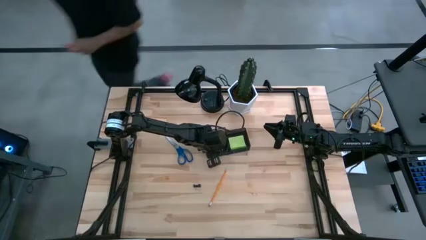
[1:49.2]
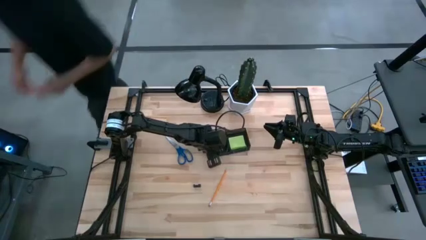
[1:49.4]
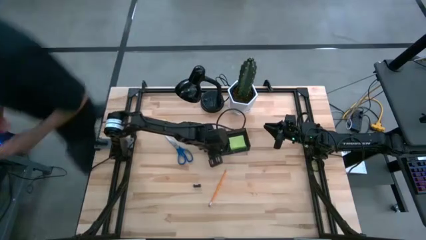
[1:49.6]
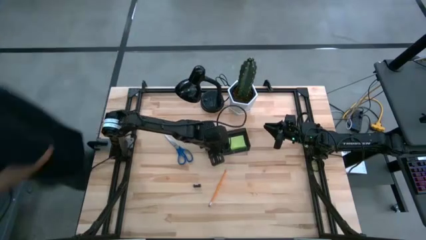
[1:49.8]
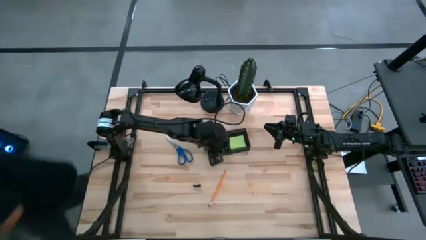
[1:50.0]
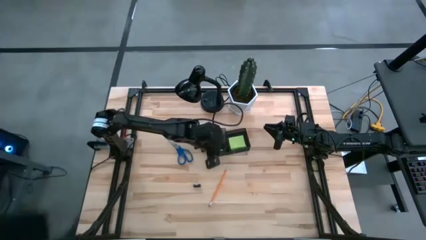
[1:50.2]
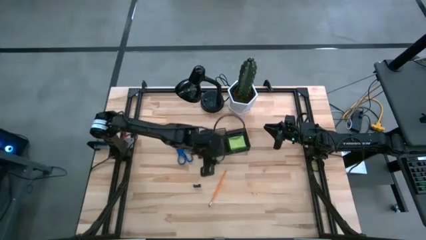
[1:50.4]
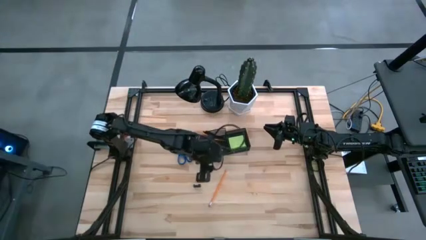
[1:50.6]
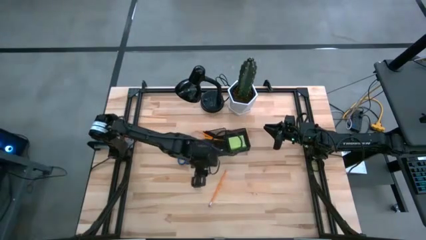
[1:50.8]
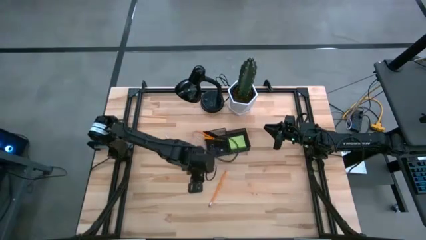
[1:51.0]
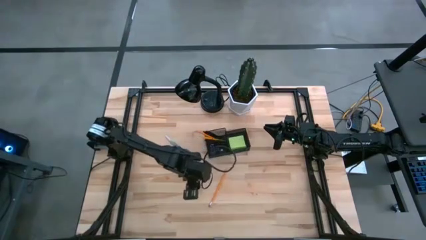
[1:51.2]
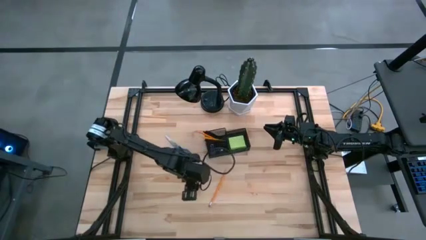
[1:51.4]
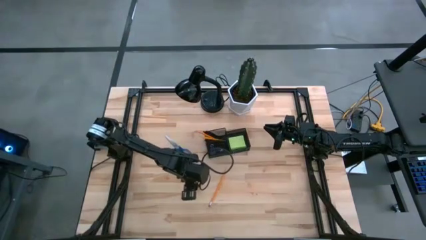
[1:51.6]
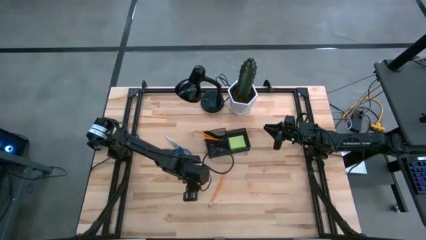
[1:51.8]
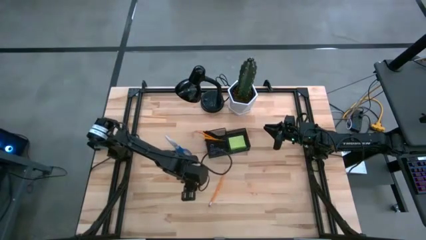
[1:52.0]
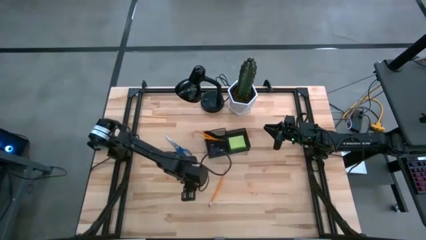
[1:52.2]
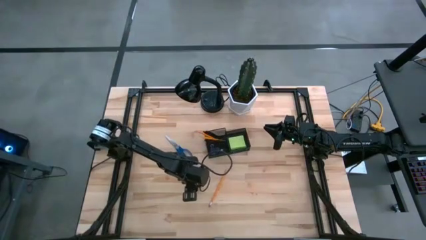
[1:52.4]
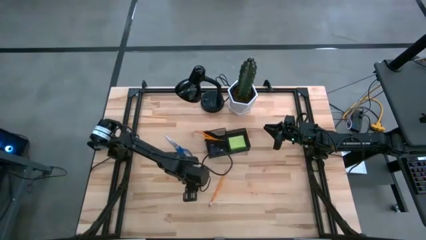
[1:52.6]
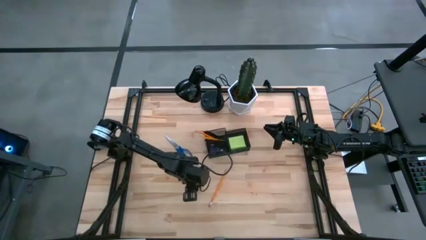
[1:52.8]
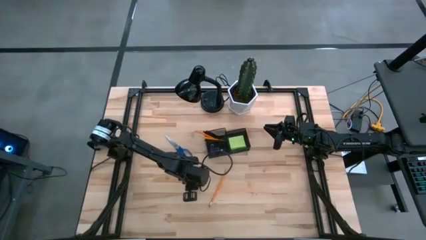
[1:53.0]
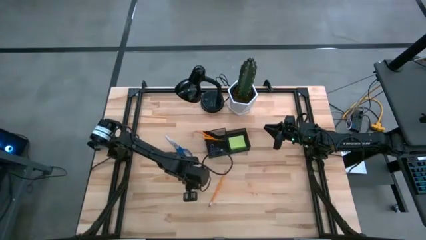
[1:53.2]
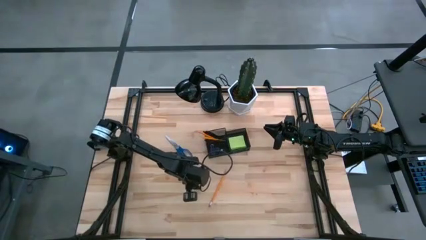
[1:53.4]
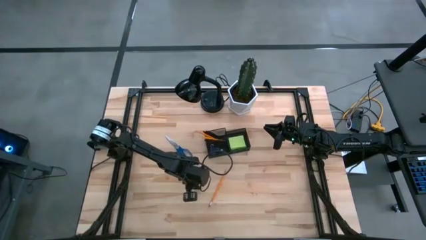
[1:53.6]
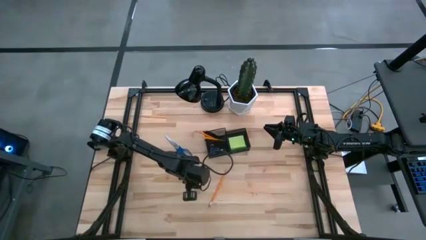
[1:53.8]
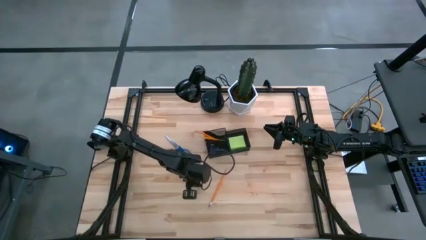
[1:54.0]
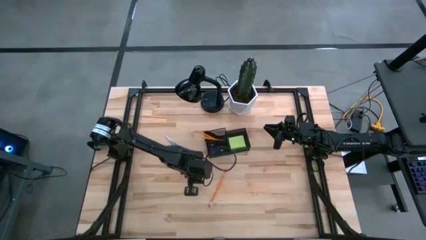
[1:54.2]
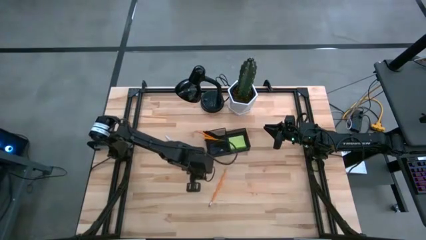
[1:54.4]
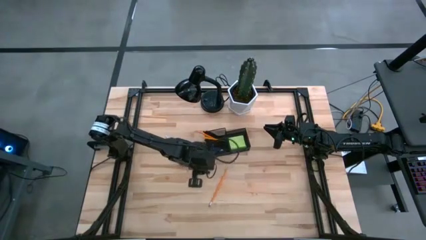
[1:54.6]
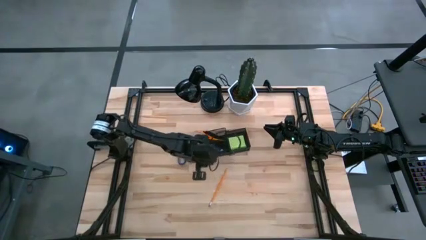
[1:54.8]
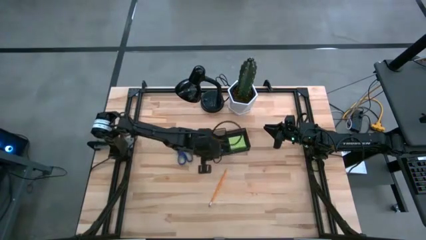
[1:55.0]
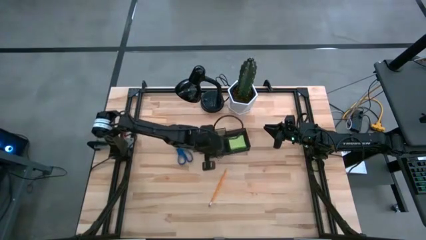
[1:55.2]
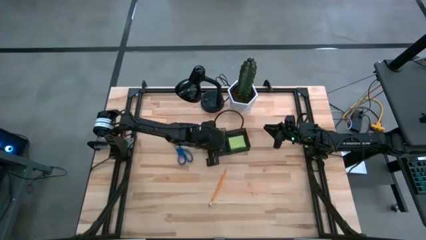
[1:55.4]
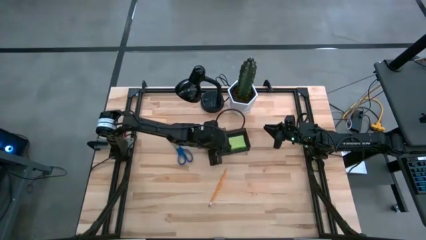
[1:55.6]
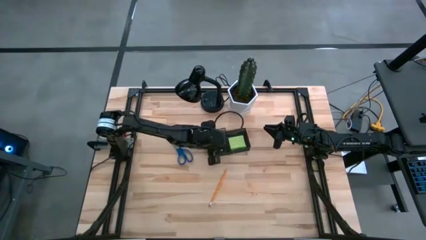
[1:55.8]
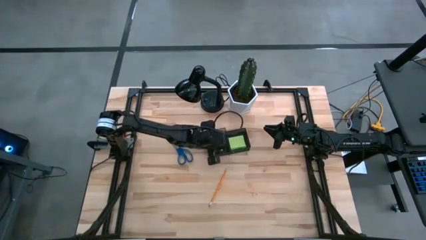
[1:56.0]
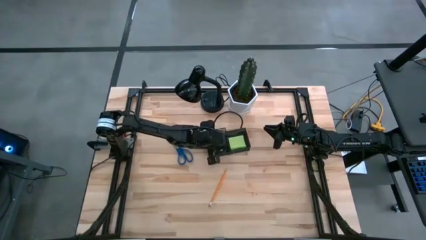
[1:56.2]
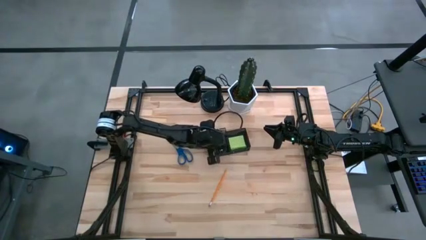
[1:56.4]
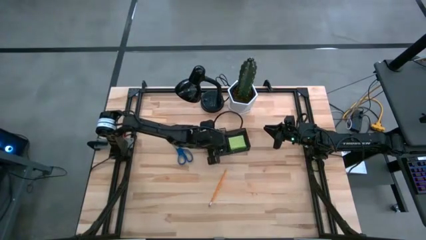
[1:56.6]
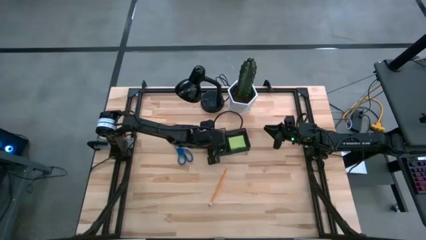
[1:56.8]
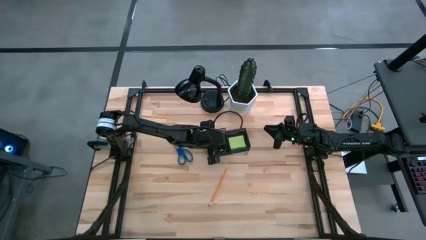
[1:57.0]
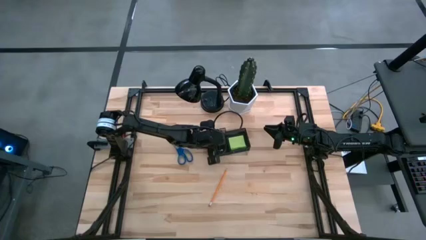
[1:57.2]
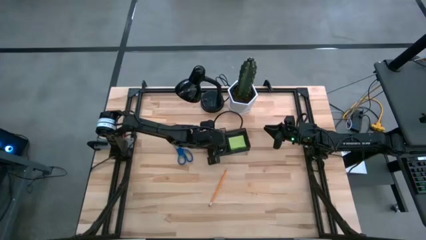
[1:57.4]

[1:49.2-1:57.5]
Task: Pick and place office supplies into organizer
Put the black binder clip into the desk organizer
